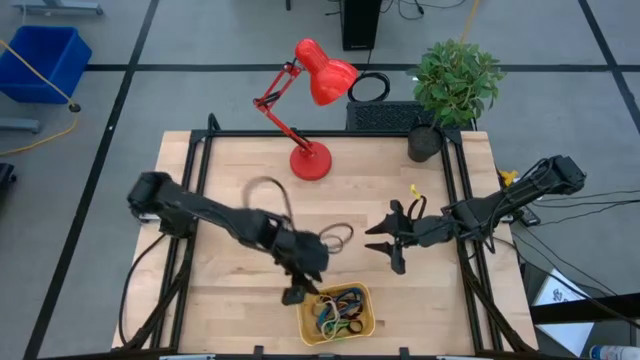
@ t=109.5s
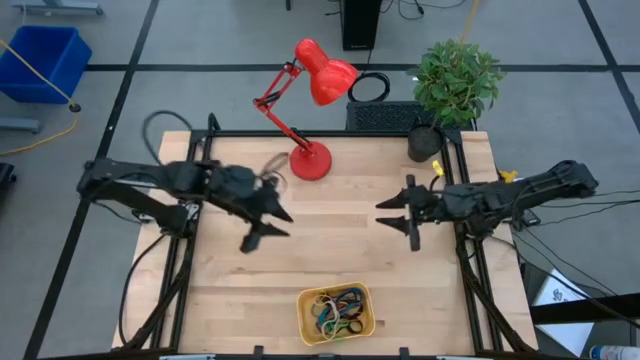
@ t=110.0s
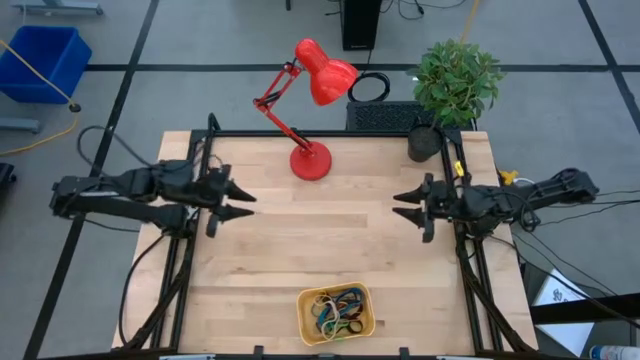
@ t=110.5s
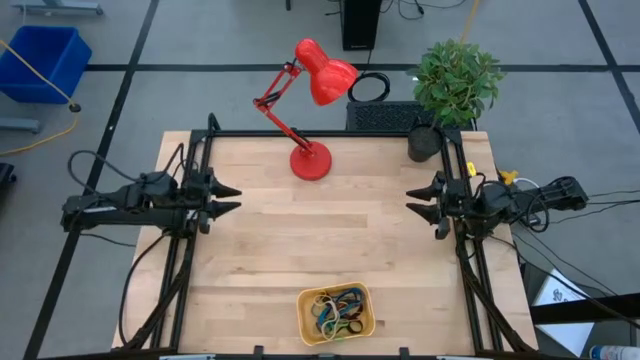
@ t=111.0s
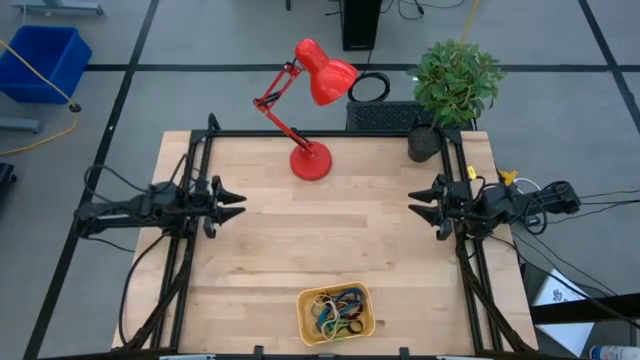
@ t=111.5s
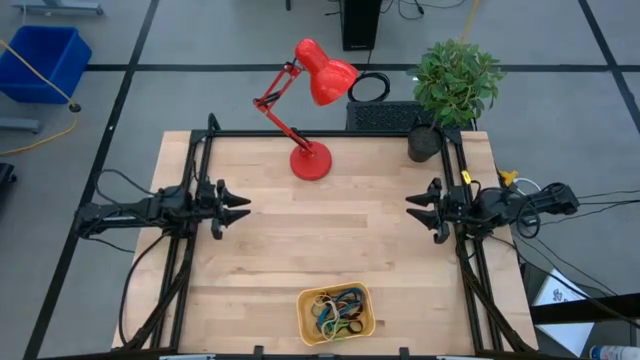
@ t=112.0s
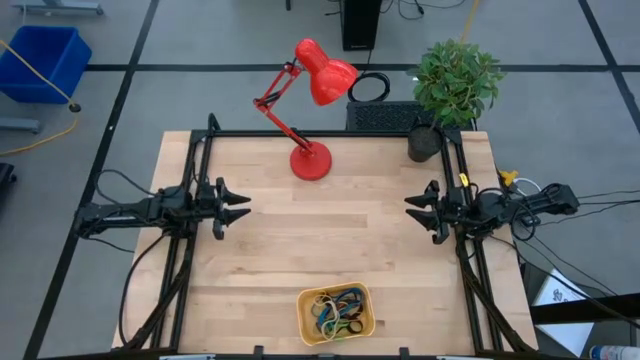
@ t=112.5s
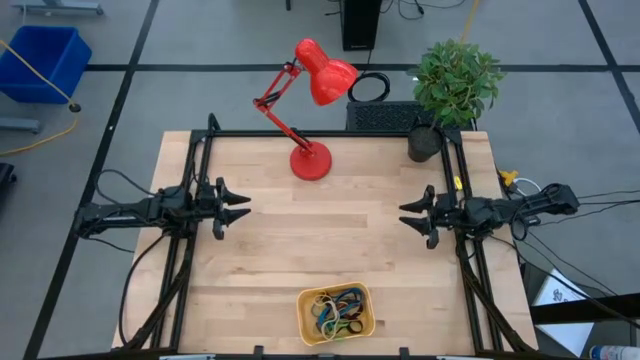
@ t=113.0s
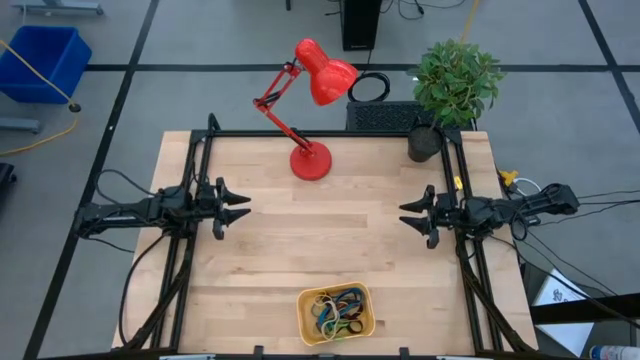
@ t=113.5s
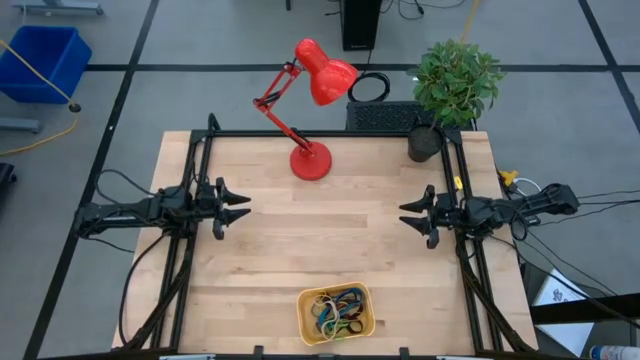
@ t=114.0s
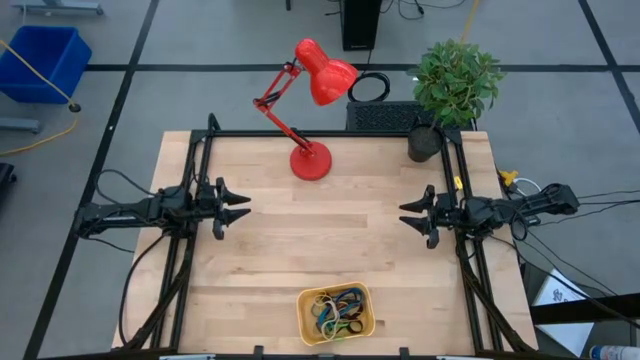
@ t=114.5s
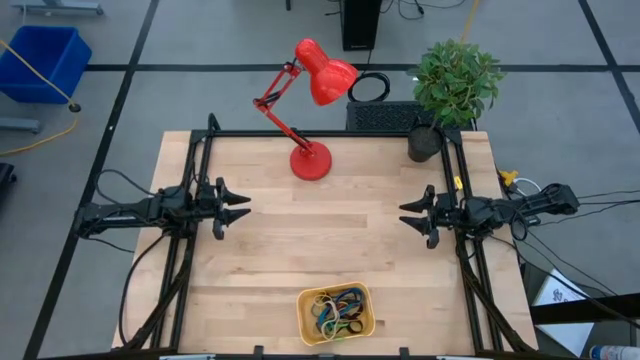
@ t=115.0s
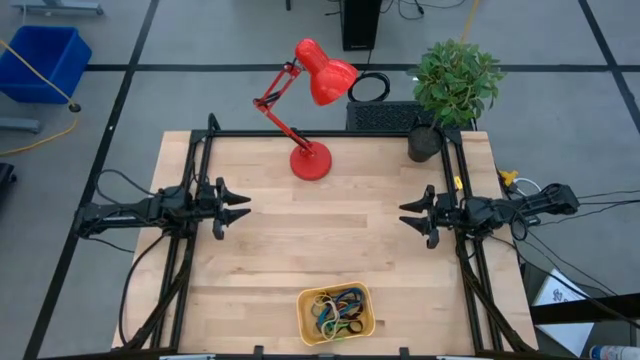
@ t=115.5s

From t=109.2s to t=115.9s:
Task: Pick and place rubber bands into bin
Return to Home Position

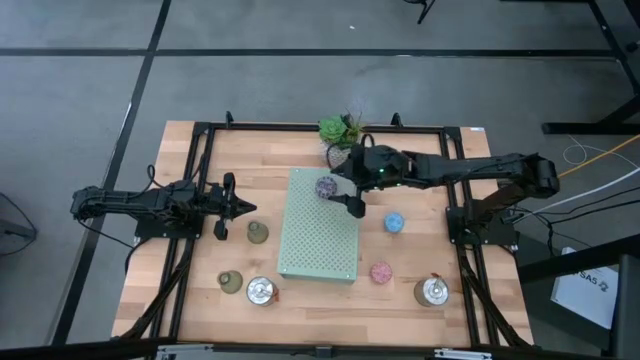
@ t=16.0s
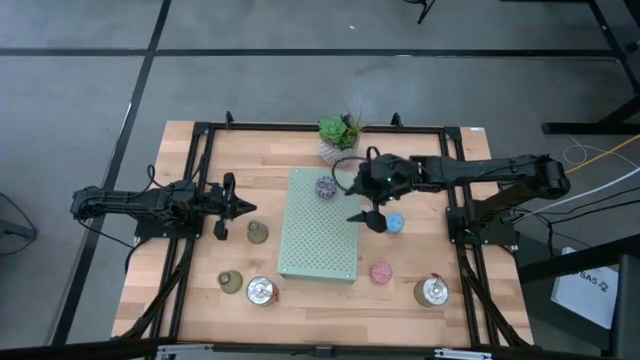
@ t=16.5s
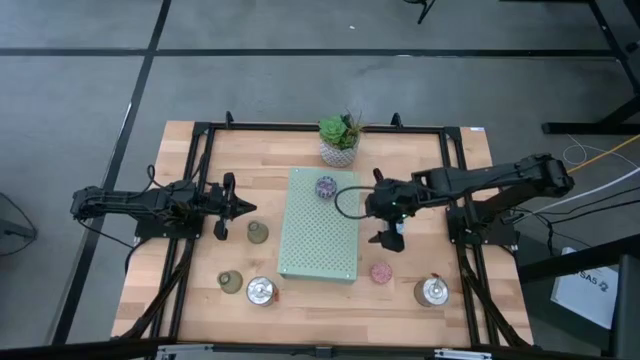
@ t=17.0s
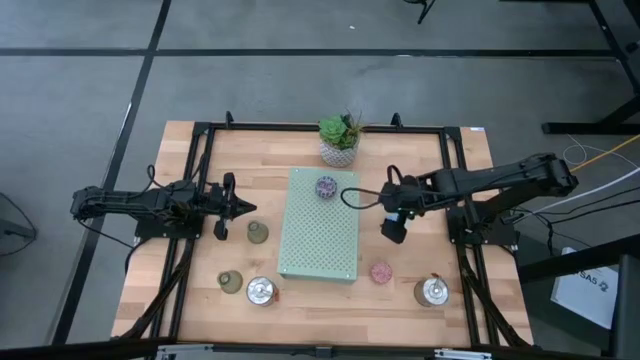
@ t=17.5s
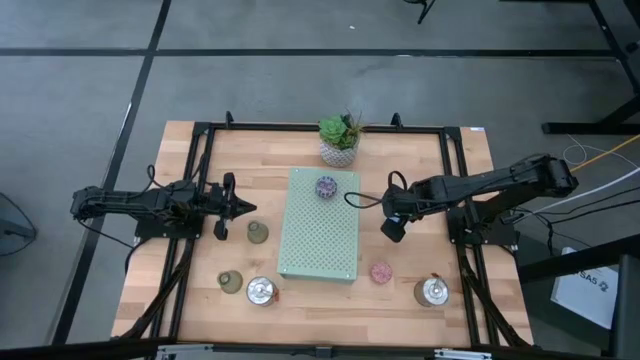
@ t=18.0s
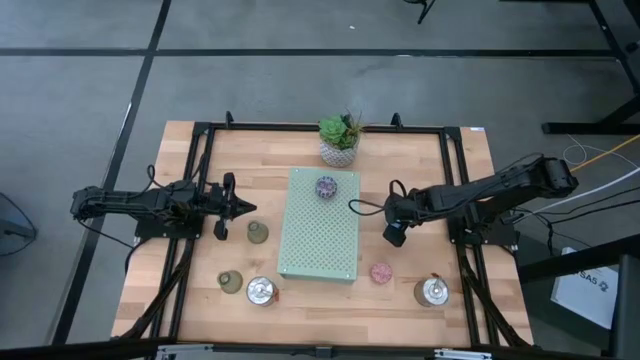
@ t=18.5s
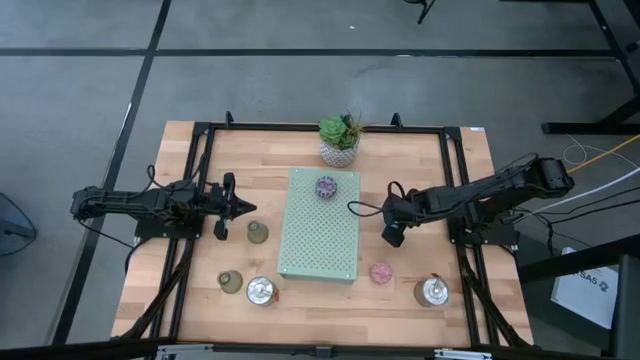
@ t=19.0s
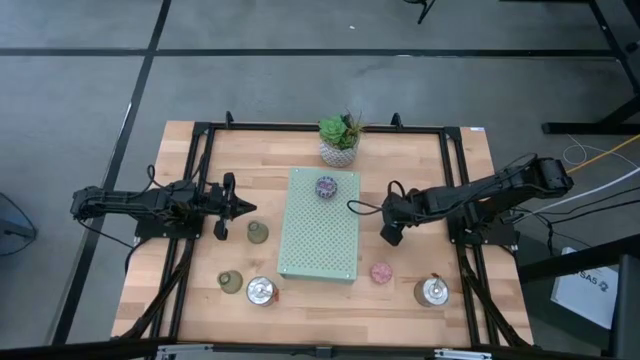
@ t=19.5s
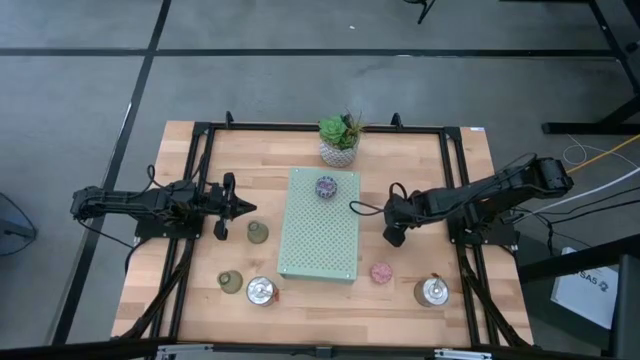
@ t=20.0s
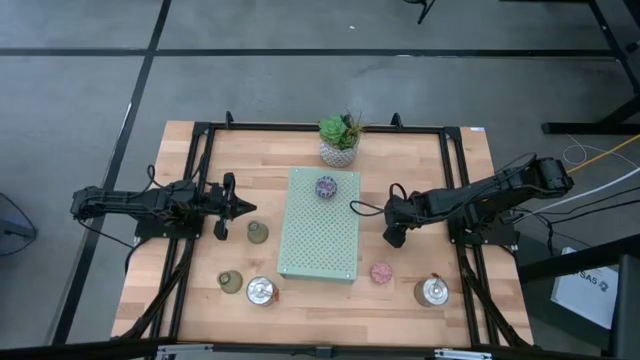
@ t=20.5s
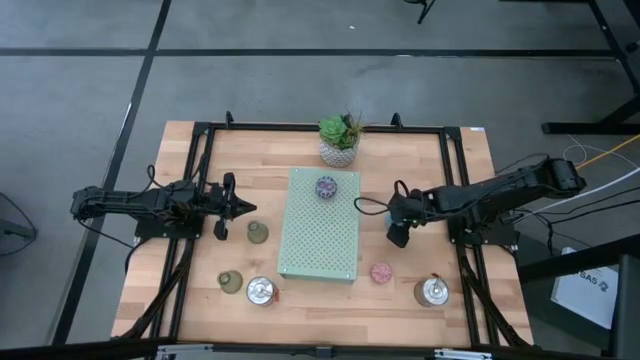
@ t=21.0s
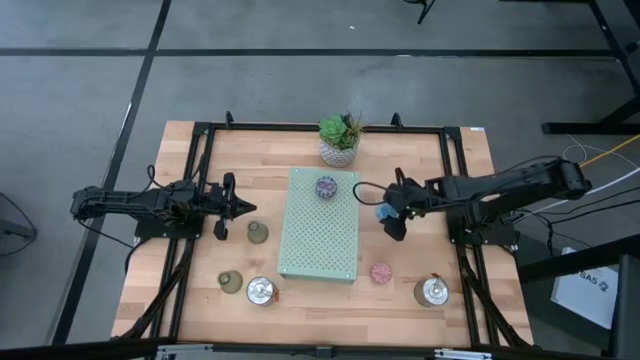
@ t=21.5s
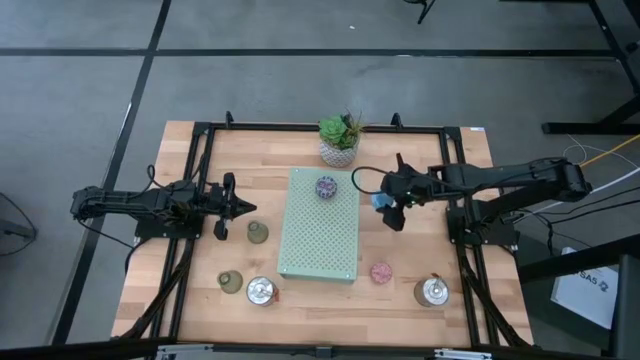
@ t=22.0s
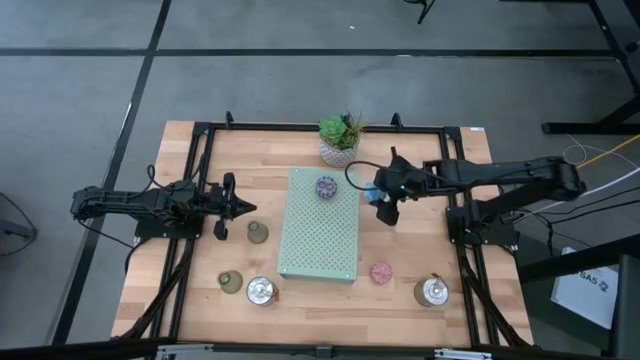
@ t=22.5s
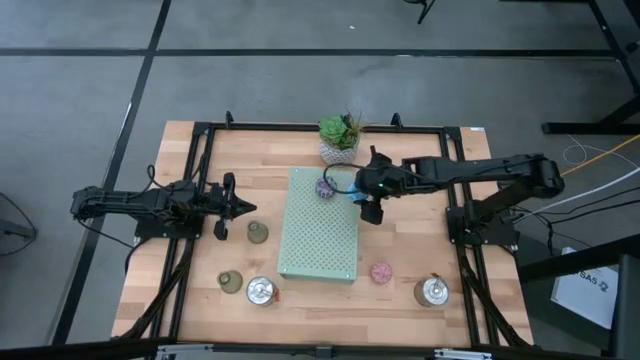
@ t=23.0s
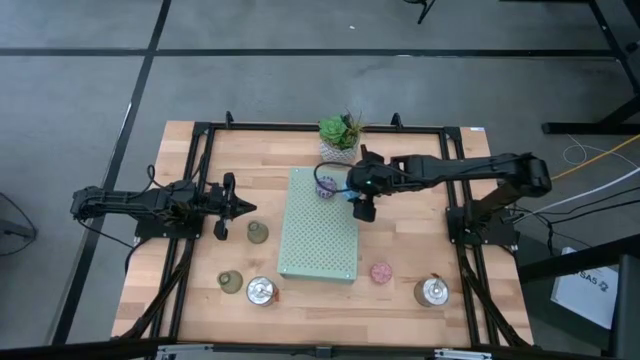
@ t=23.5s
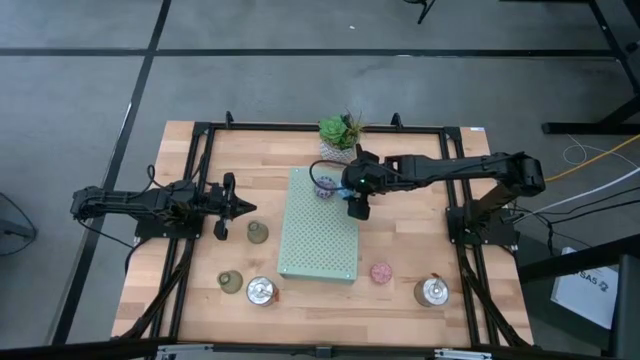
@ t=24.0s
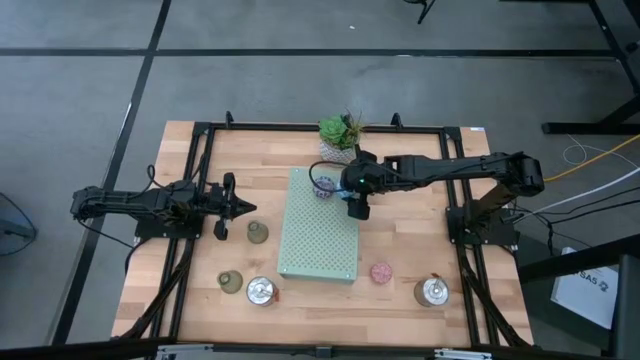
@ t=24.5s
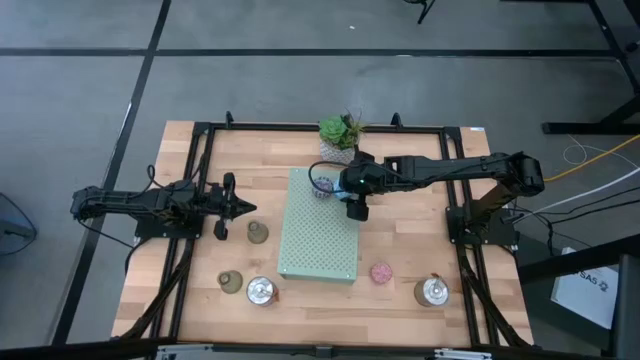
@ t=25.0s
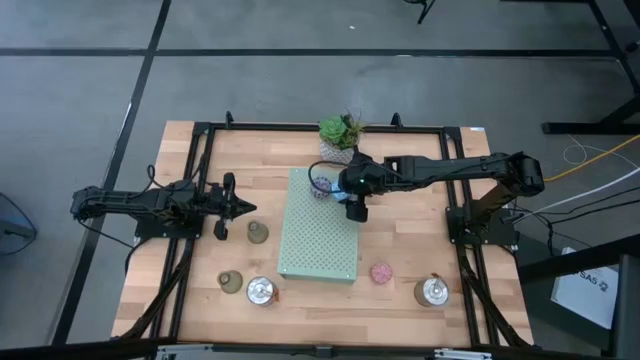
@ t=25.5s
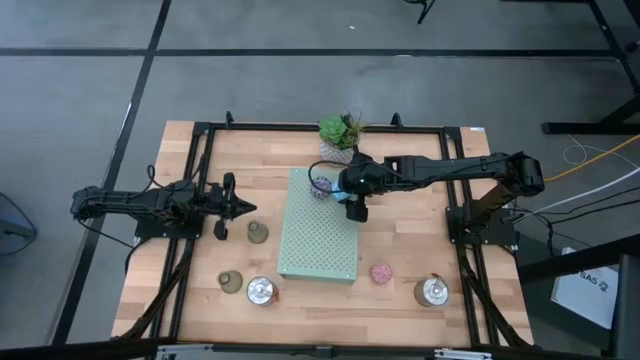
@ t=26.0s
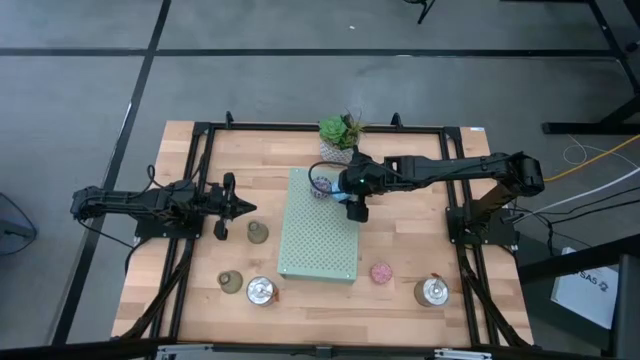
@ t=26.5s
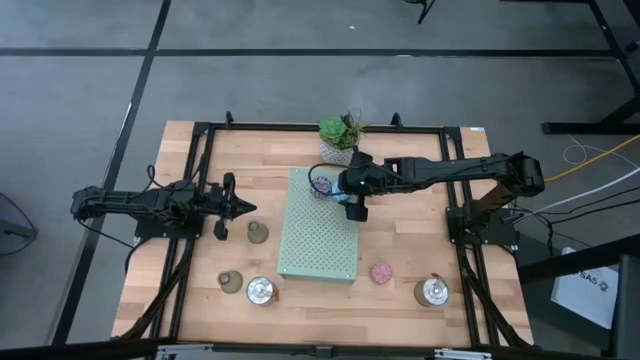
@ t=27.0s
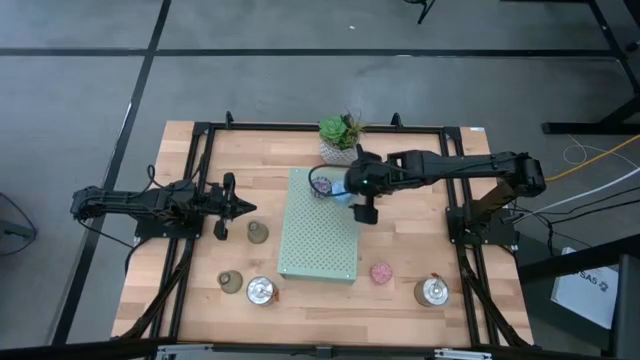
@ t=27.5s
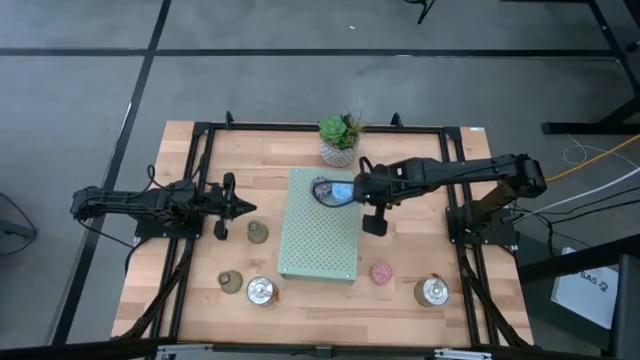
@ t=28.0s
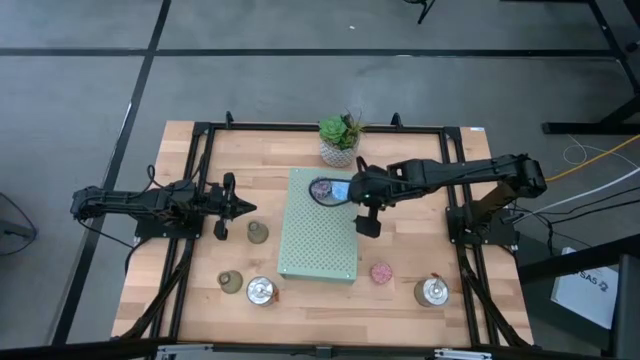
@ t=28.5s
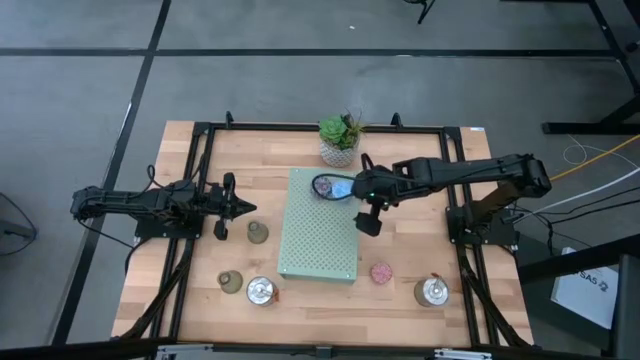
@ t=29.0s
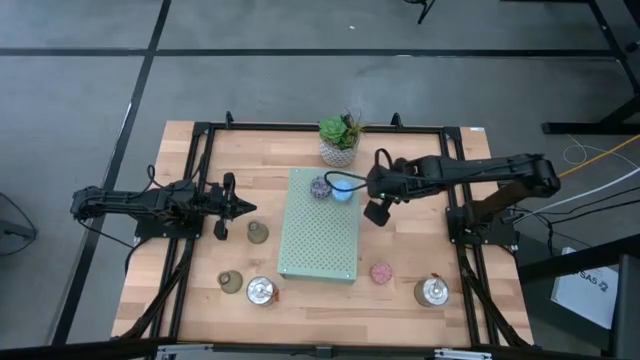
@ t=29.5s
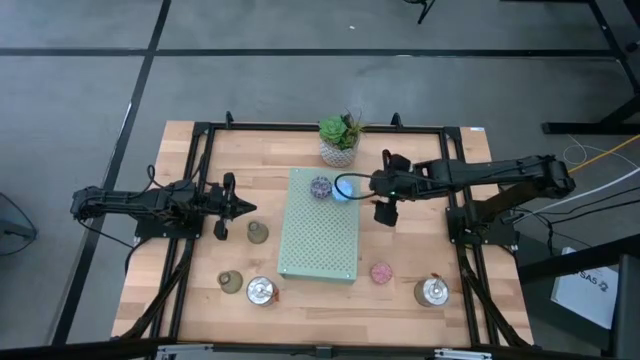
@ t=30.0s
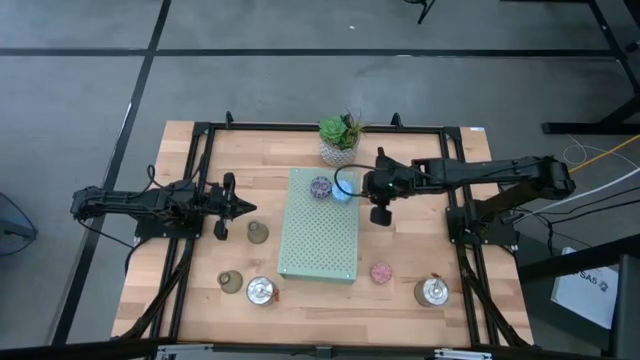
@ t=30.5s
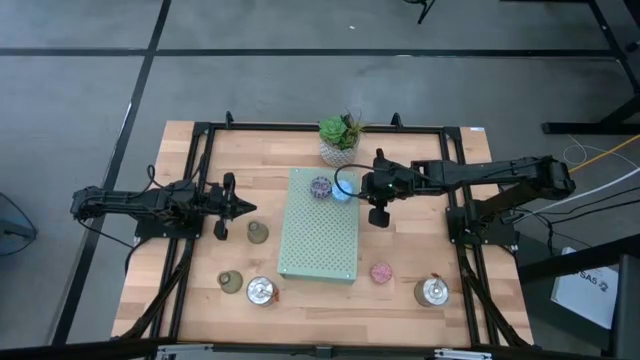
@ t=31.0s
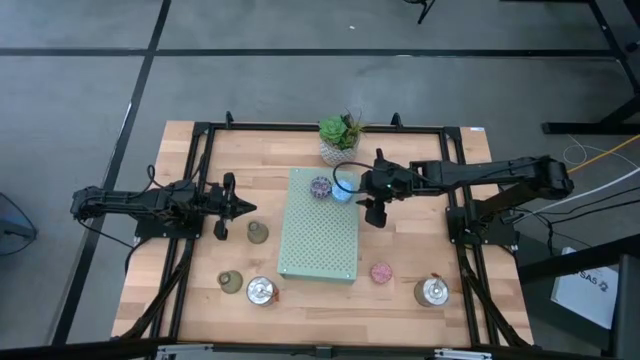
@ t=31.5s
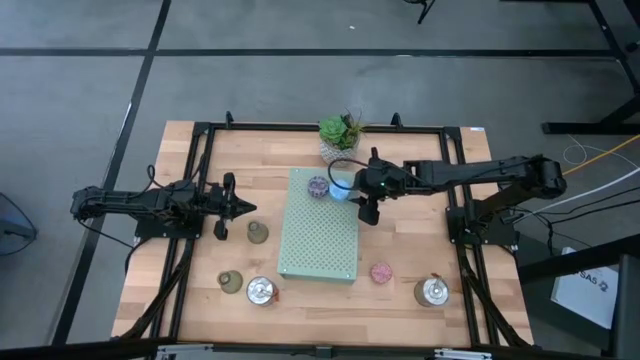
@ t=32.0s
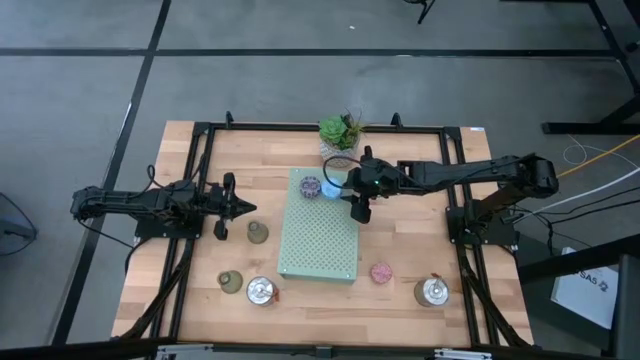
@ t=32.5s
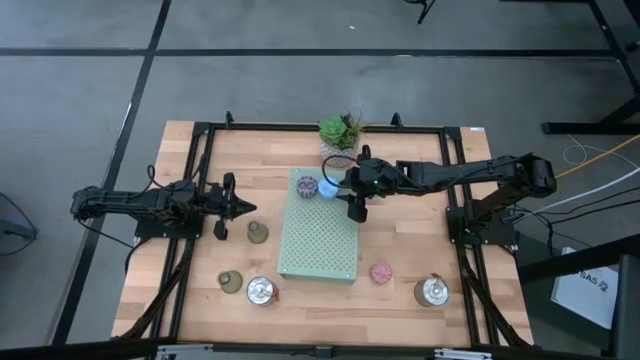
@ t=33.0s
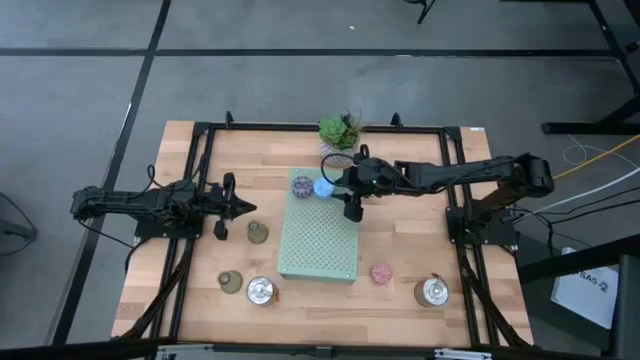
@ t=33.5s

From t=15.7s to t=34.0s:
Task: Pick & Place candle stick holders
Put the blue patterned scented candle on the shelf
